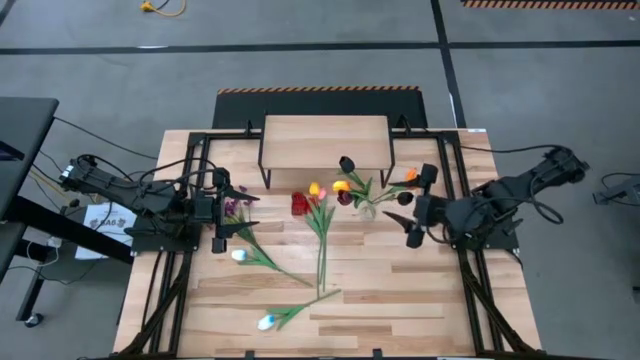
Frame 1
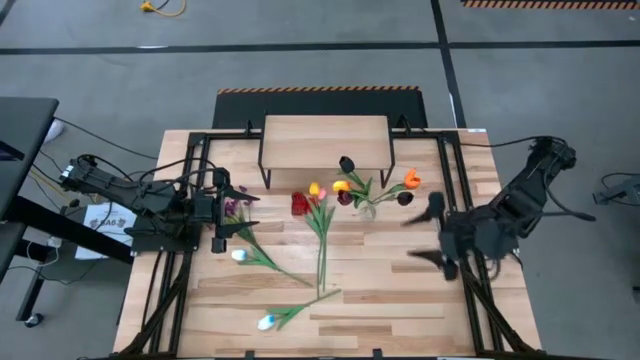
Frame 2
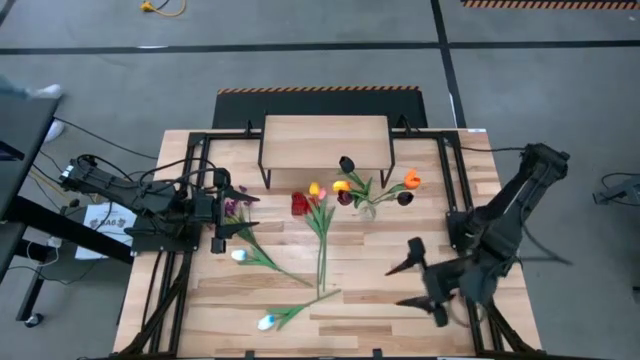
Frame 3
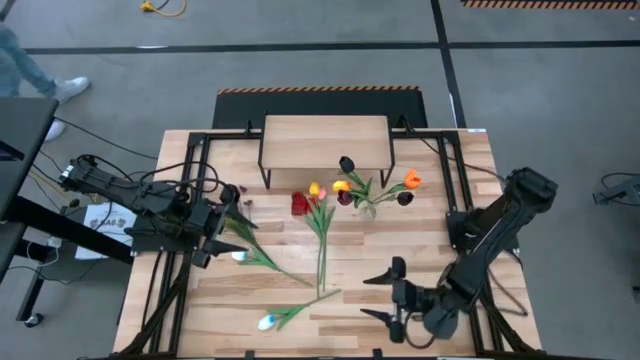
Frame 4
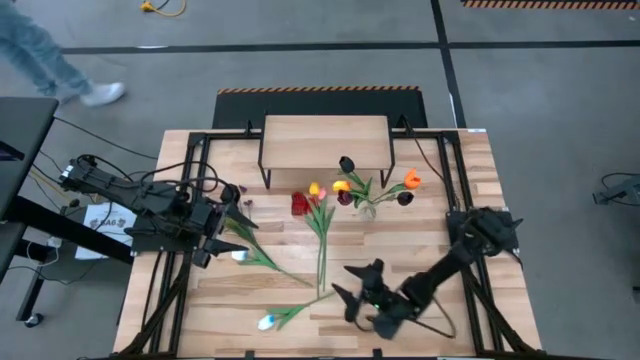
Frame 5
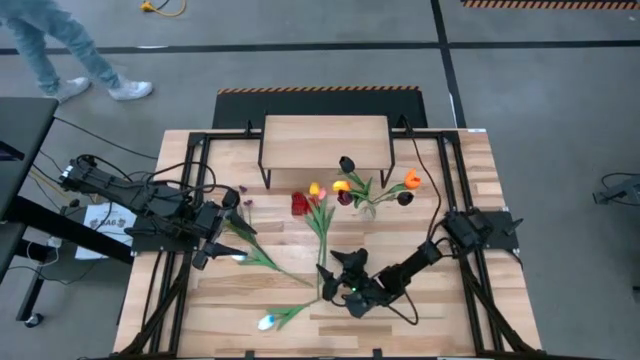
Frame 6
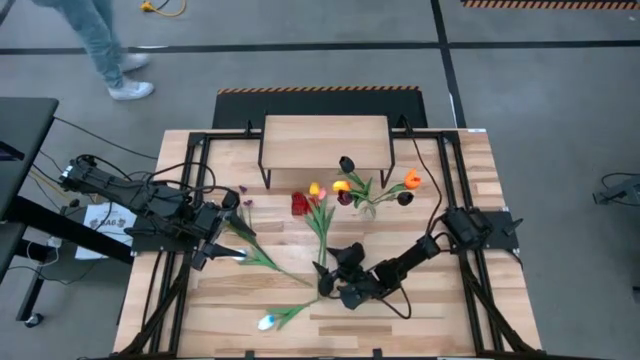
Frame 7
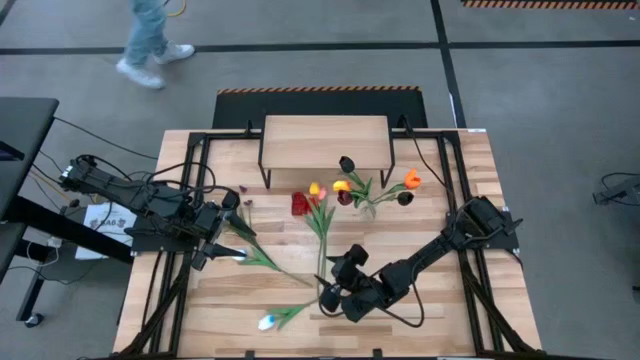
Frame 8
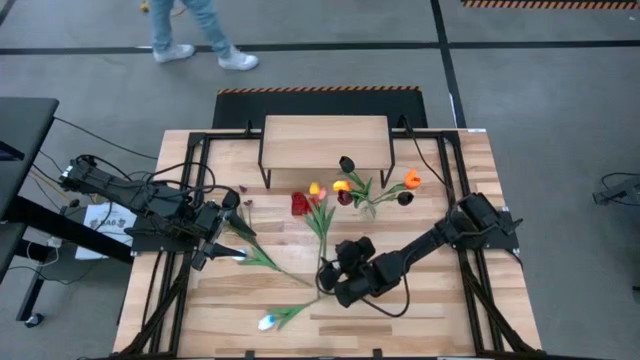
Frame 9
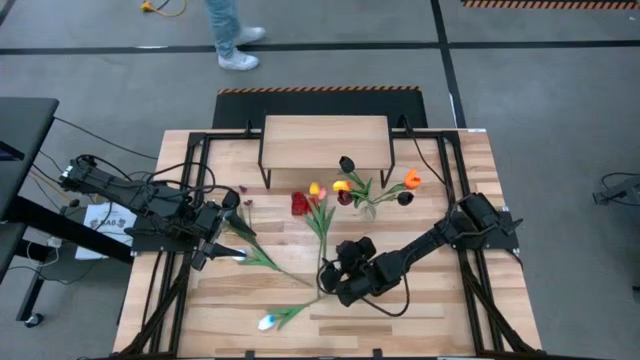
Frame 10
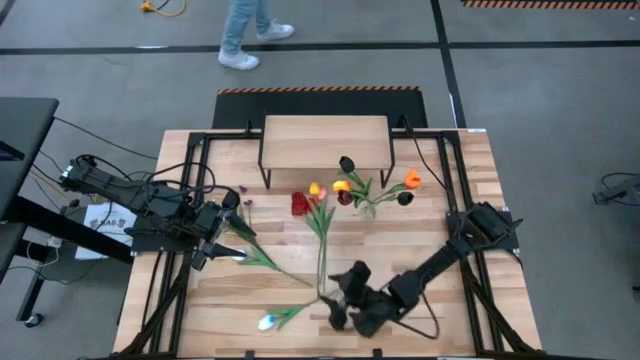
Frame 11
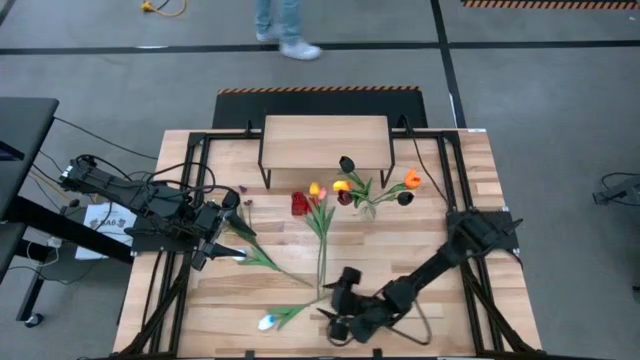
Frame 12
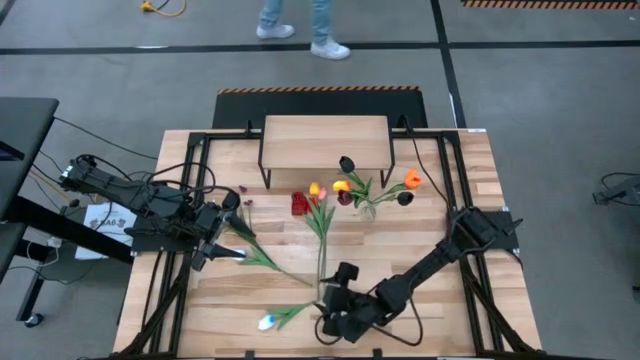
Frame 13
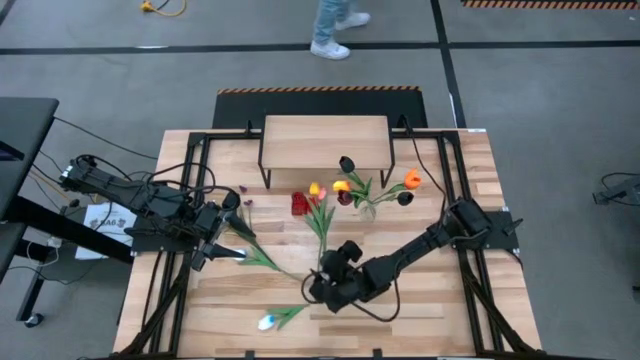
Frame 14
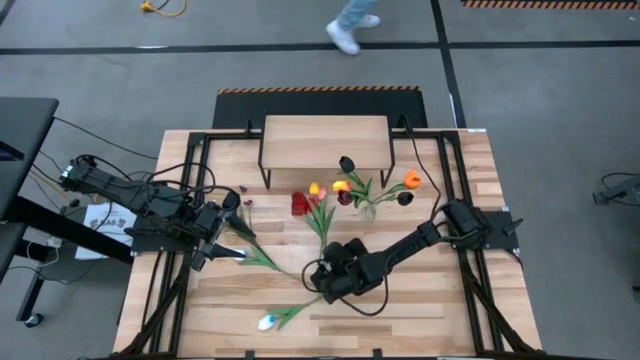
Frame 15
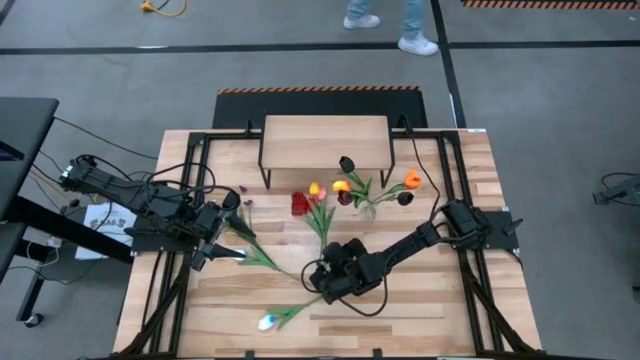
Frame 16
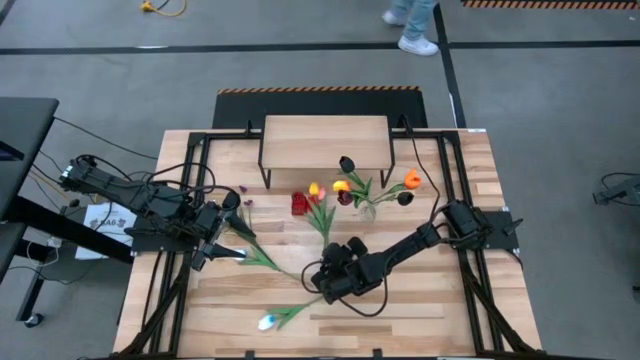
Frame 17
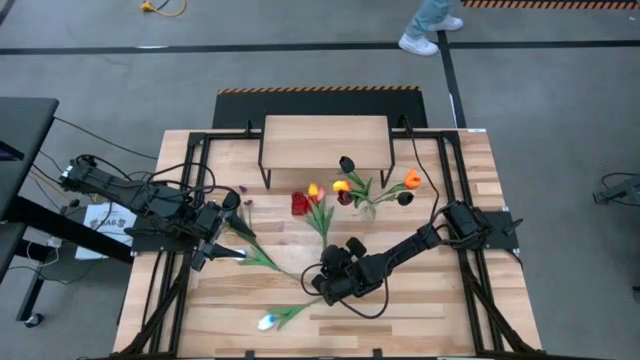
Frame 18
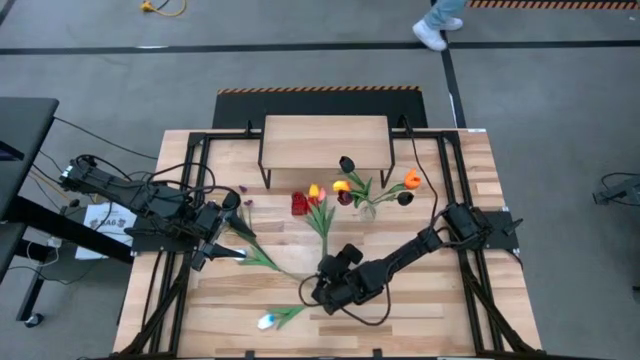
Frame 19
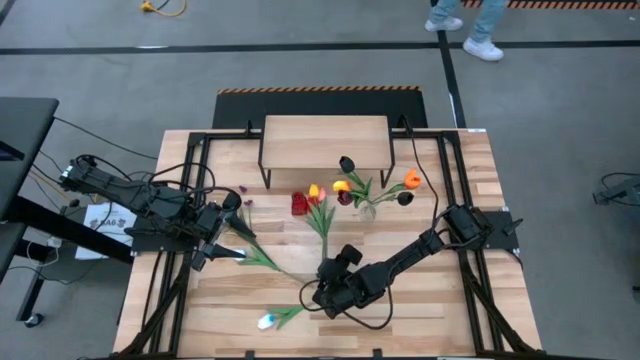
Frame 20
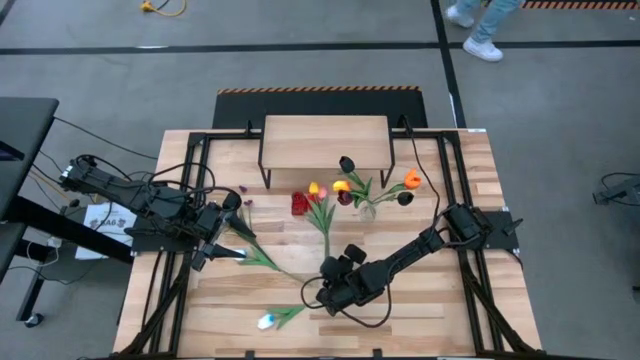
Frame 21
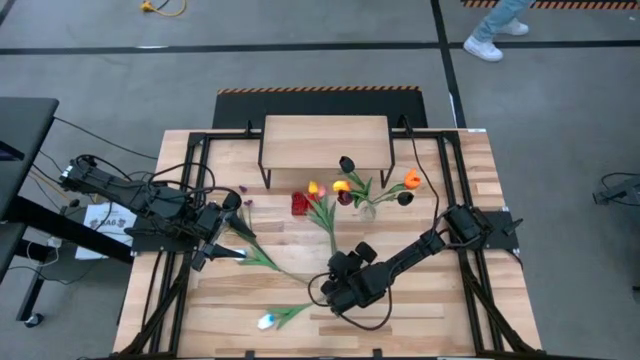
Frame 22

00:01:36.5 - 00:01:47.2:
Task: Pick and place flowers into a vace then onto a shelf
Adjust the flowers on the table

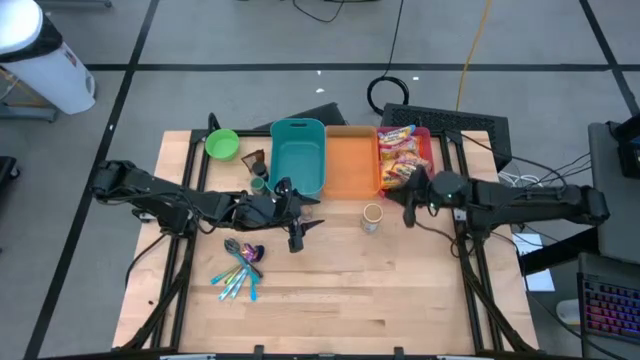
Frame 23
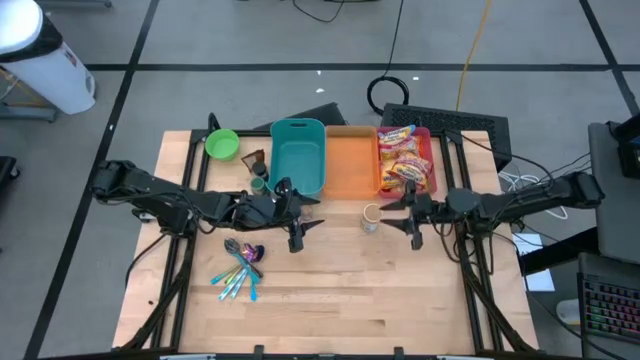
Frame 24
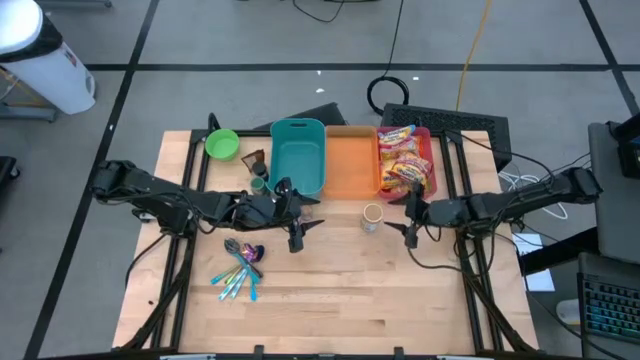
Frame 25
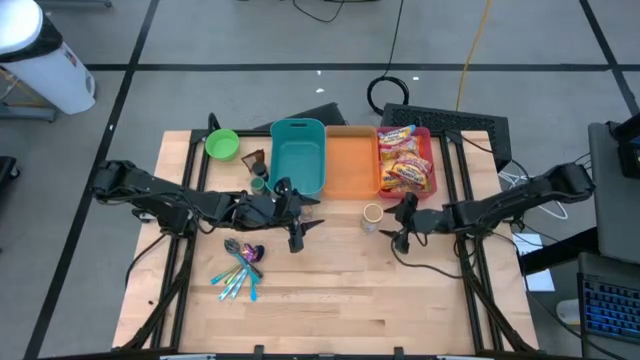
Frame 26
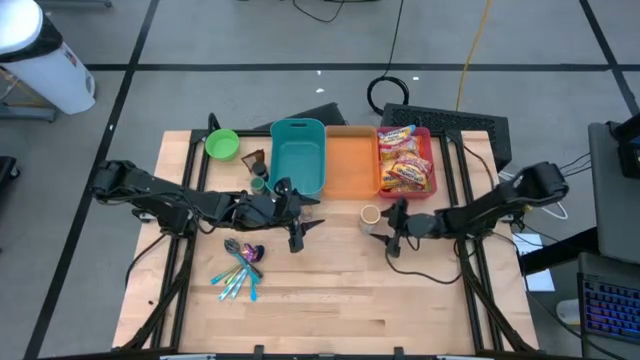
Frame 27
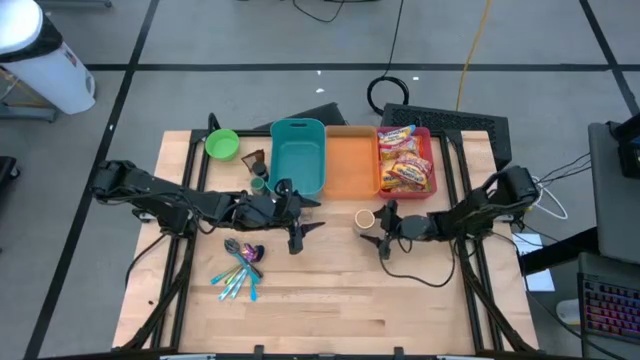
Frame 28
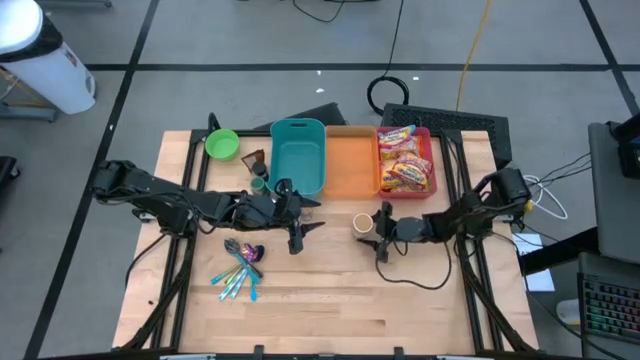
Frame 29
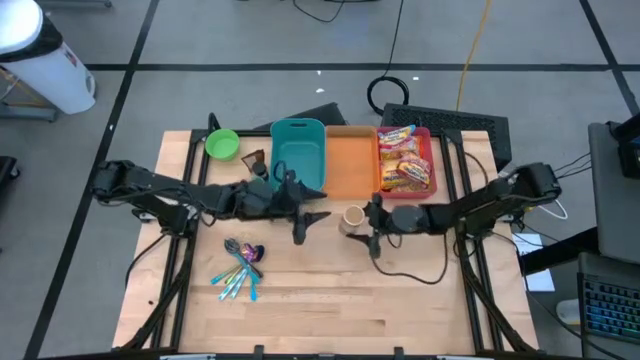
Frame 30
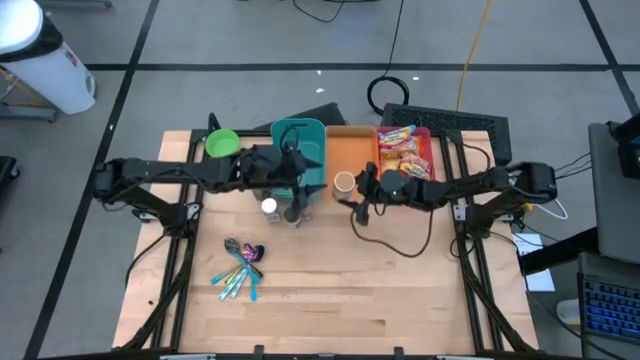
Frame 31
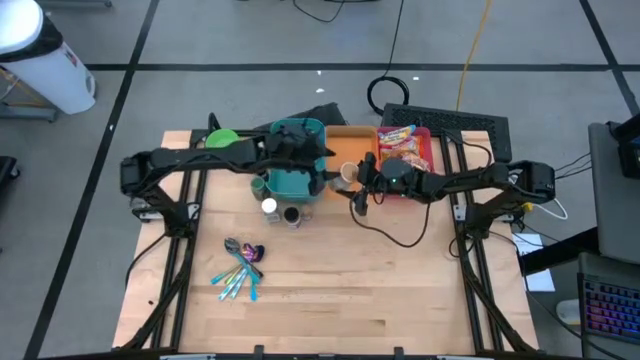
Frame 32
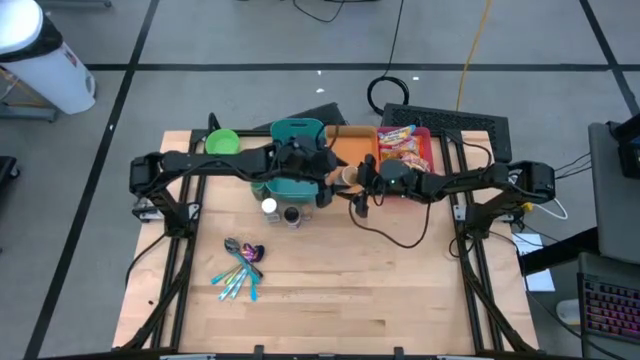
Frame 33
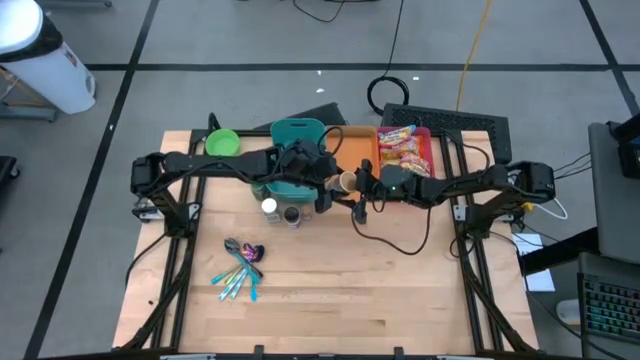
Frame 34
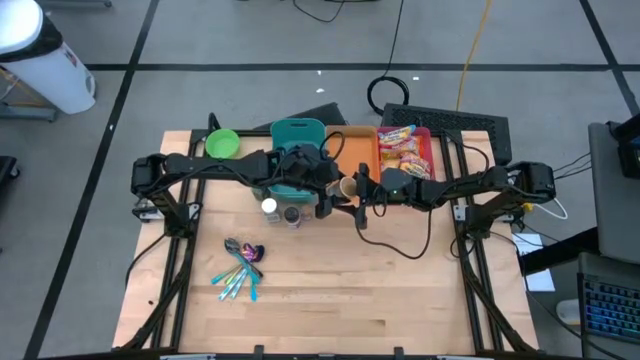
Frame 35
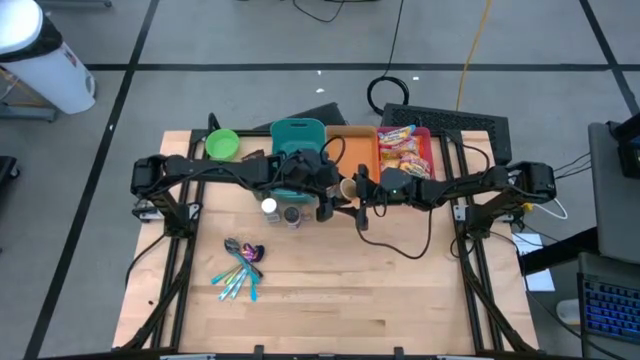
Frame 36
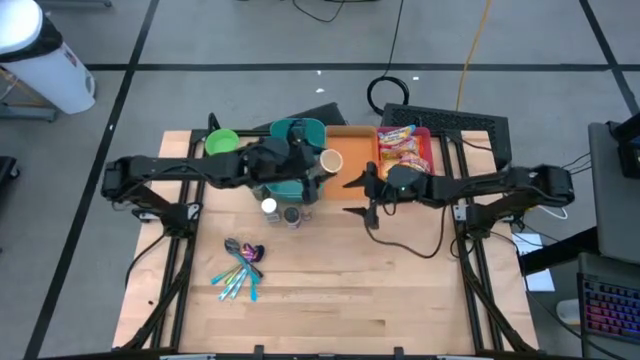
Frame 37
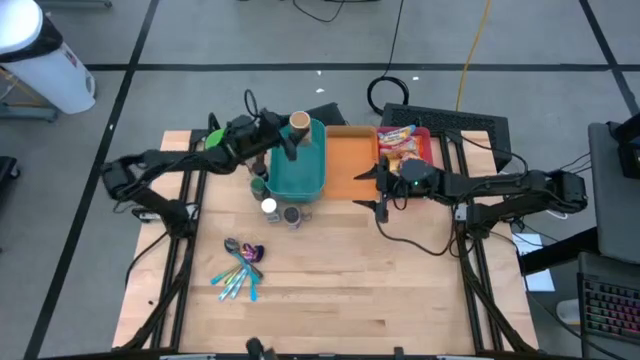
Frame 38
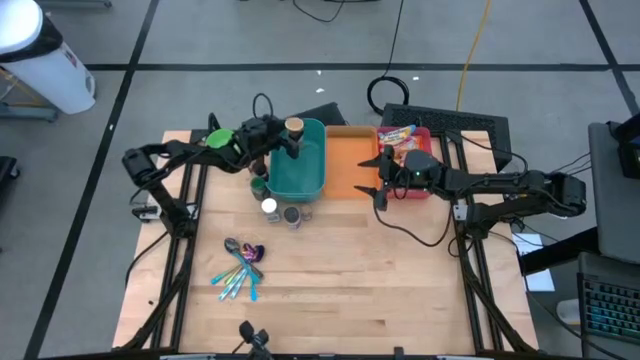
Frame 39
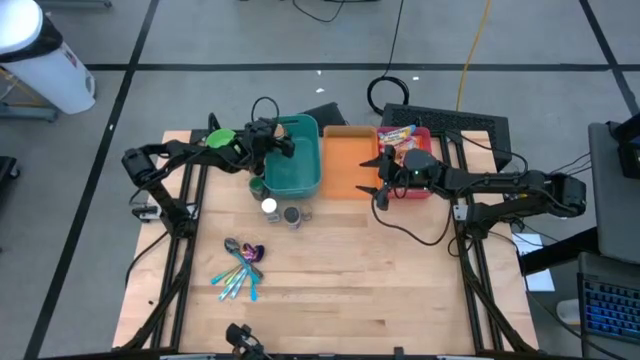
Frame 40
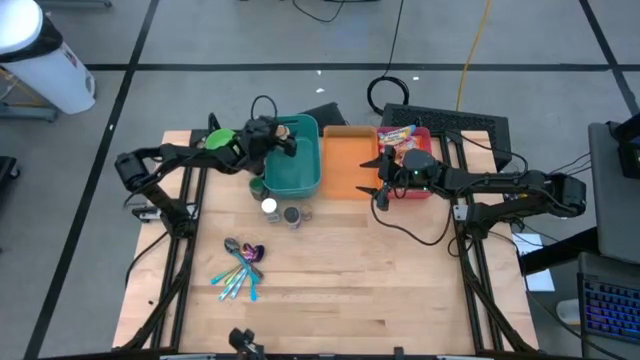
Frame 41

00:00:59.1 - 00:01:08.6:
Task: Pick & Place Food Item
Put the golden seasoning bottle into the green bin
